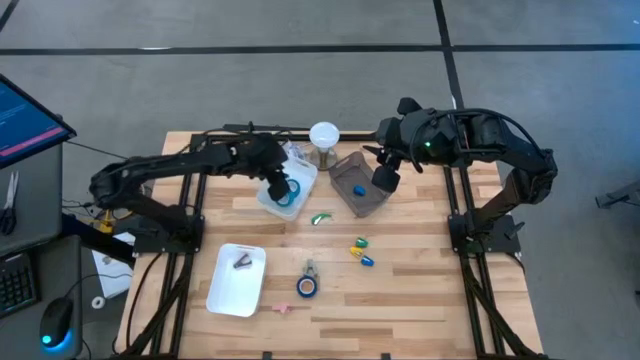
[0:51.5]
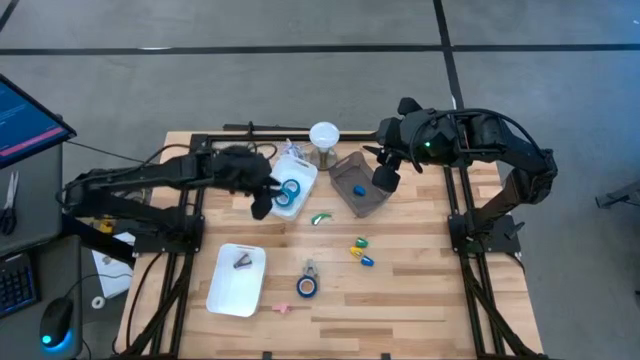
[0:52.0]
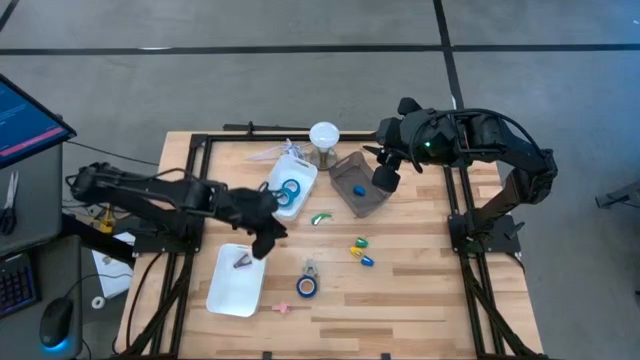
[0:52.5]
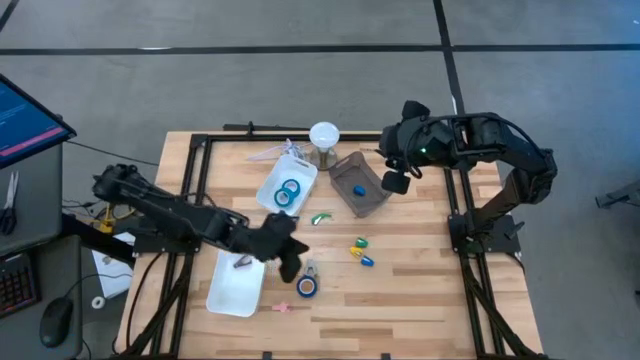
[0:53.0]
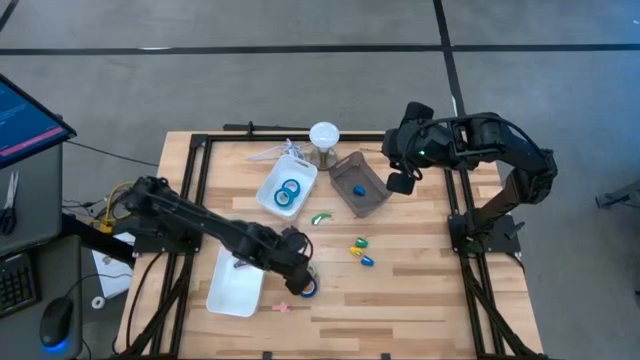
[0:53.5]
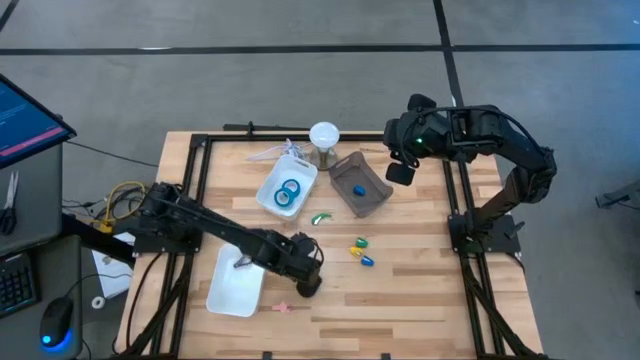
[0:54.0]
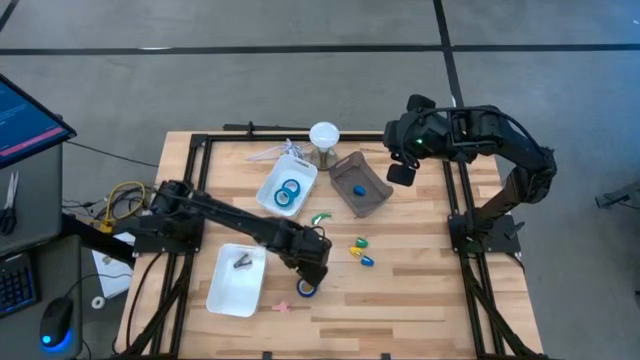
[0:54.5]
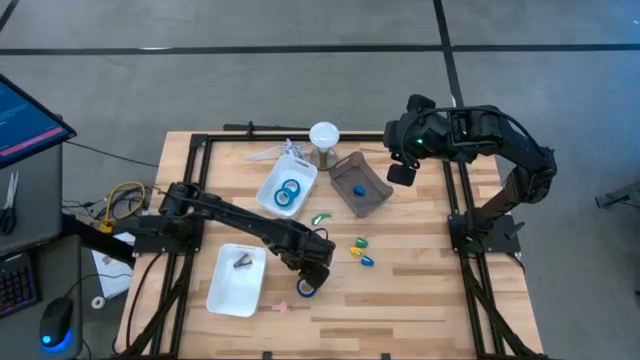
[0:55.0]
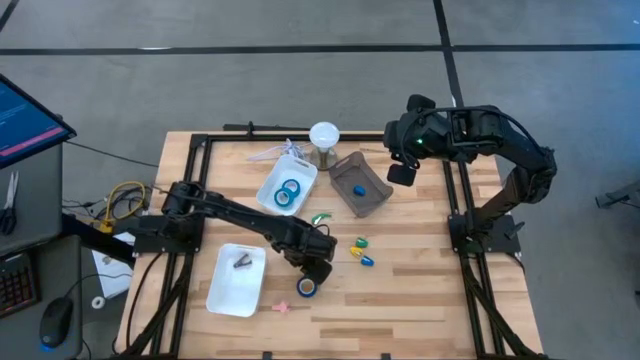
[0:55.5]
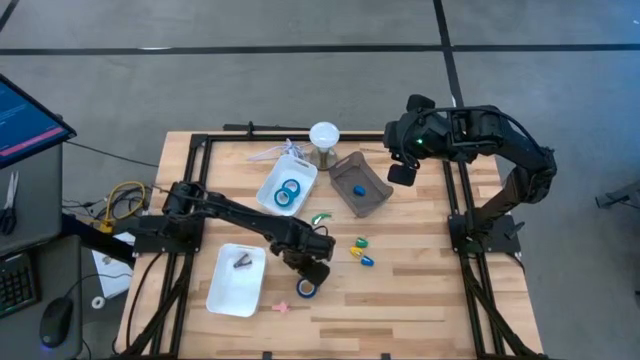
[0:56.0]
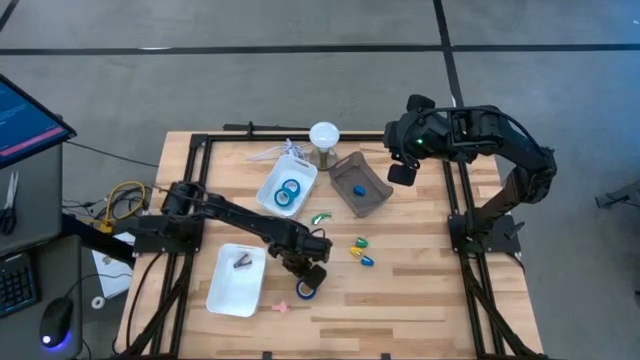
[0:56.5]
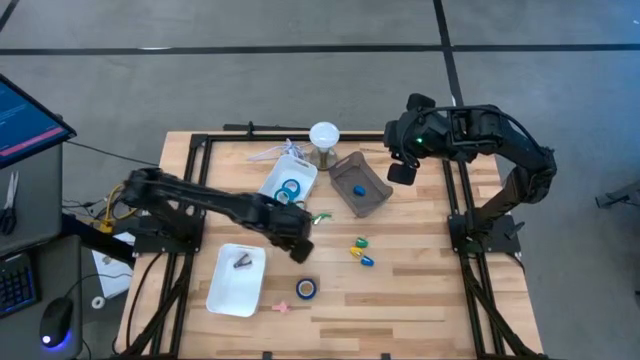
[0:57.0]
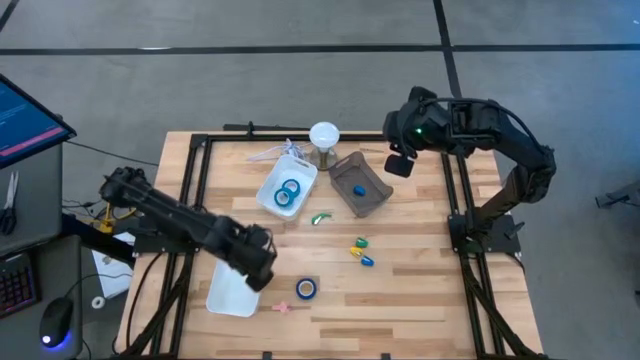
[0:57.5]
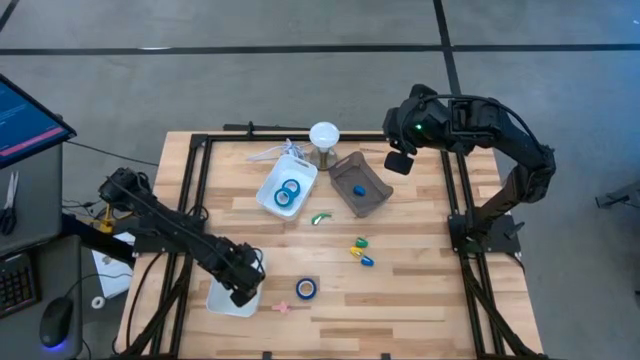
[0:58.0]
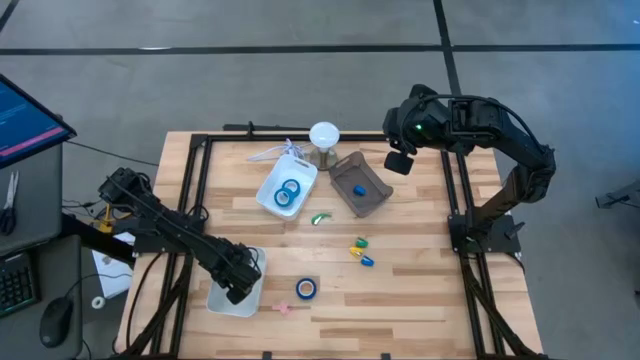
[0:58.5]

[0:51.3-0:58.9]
Task: Pick and place Stapler, Stapler remover, tape
Put the gray staple remover into the bottom white bin

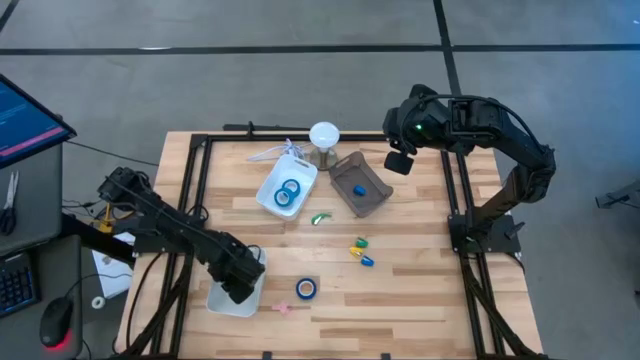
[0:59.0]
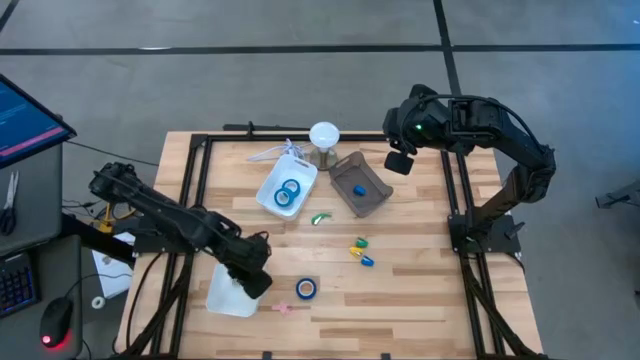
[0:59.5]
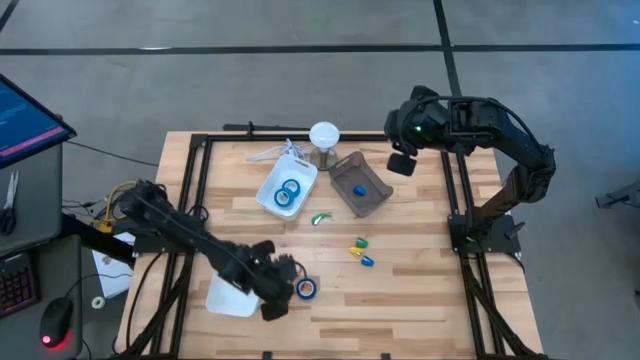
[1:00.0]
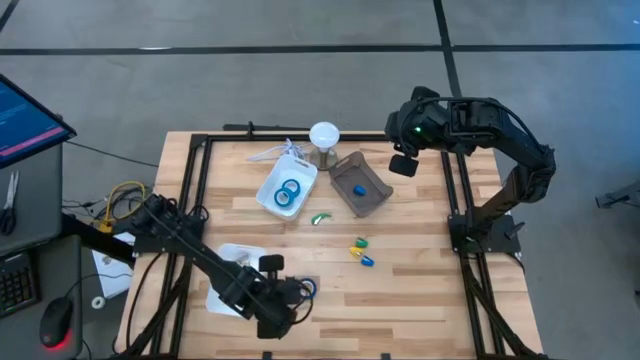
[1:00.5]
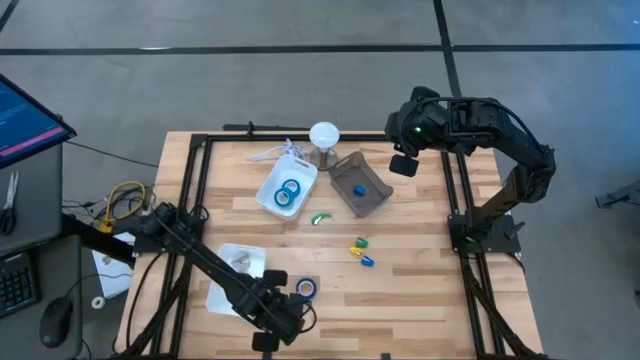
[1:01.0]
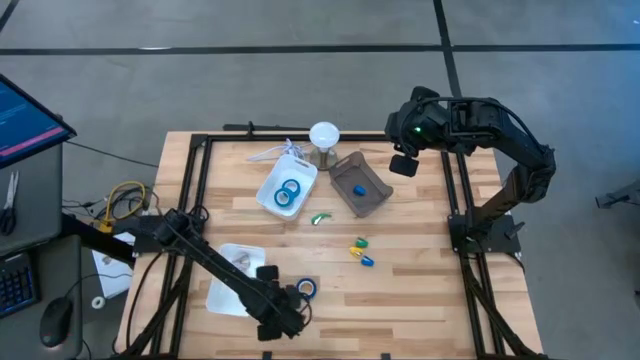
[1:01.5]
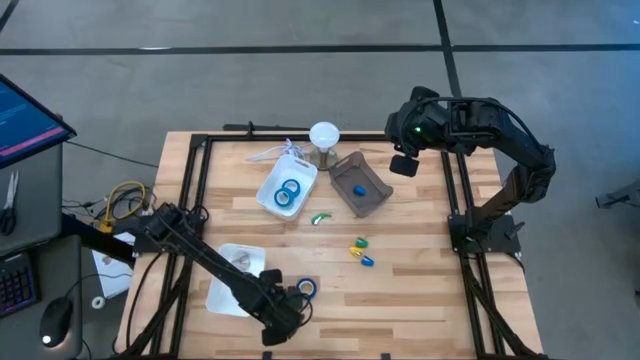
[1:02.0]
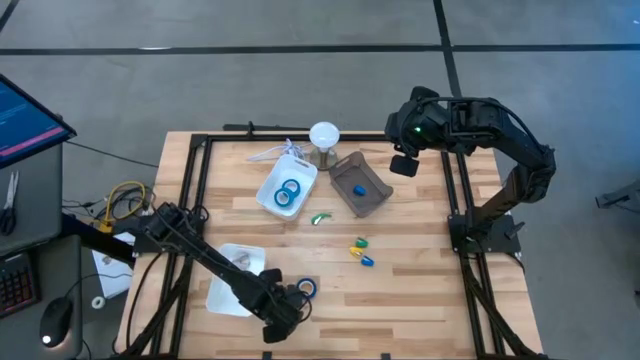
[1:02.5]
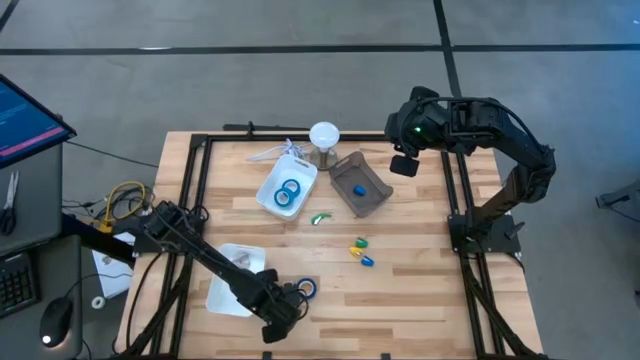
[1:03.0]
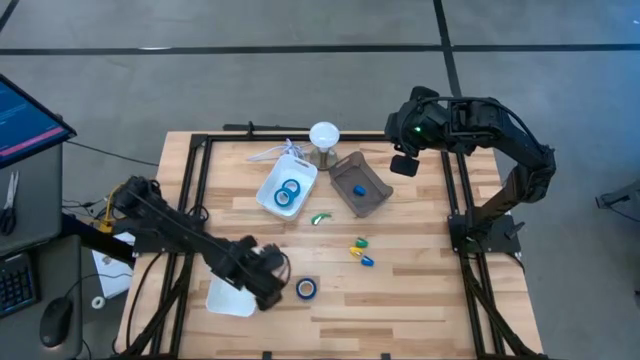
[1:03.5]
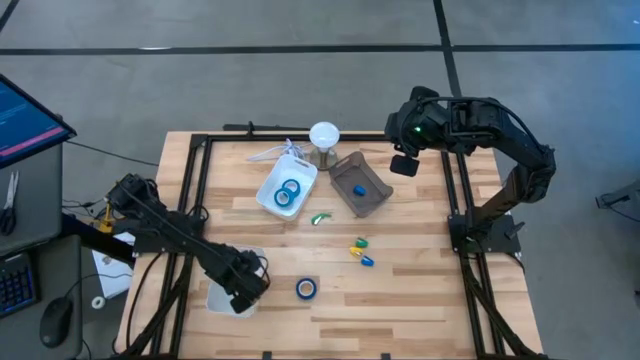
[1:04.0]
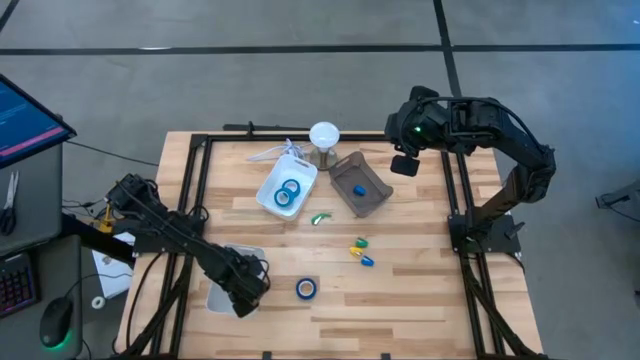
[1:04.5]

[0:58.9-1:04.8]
Put the pink staple remover into the bottom white bin

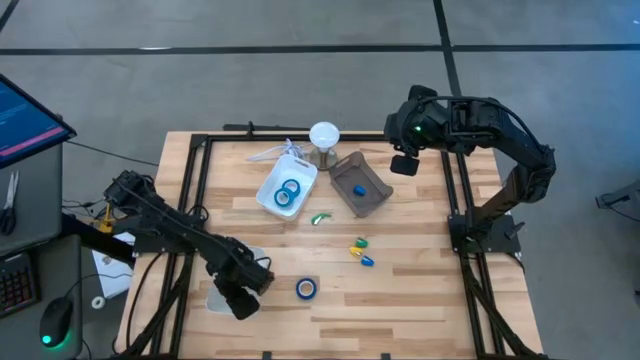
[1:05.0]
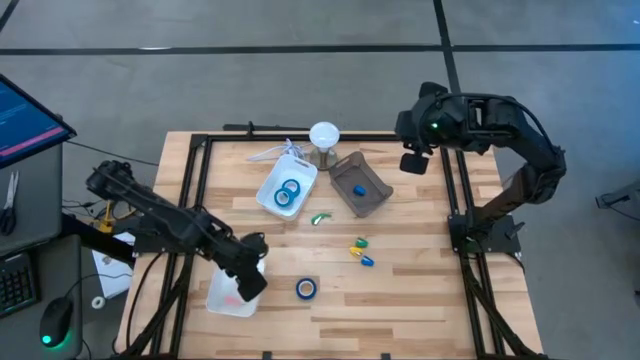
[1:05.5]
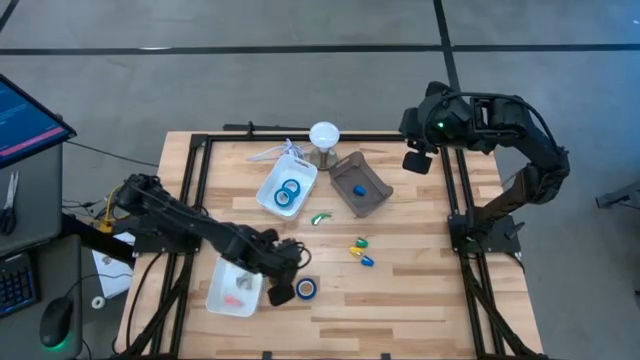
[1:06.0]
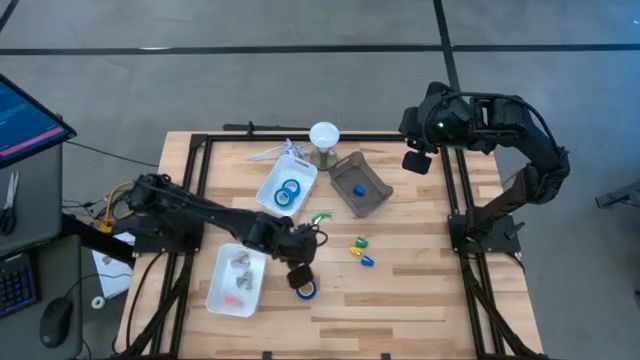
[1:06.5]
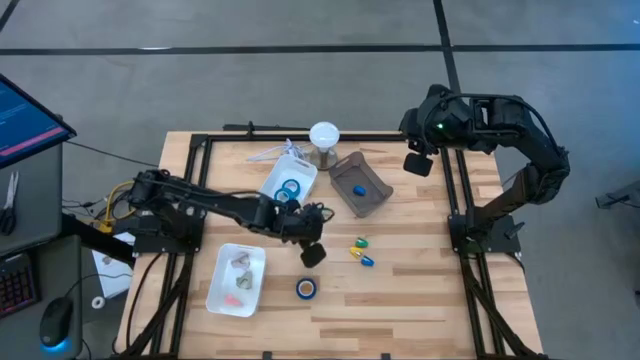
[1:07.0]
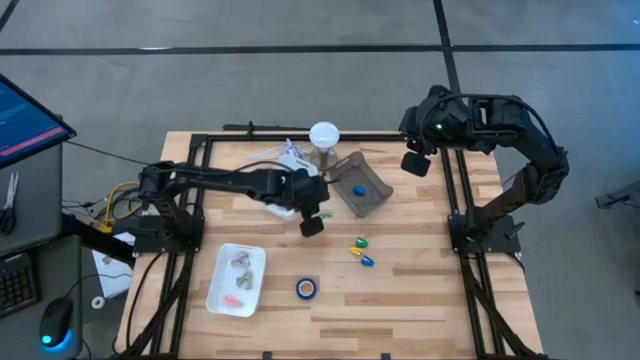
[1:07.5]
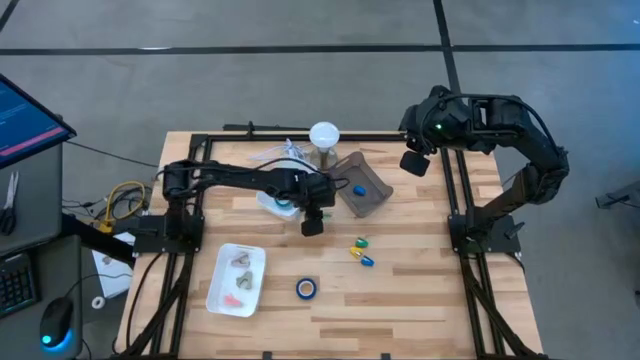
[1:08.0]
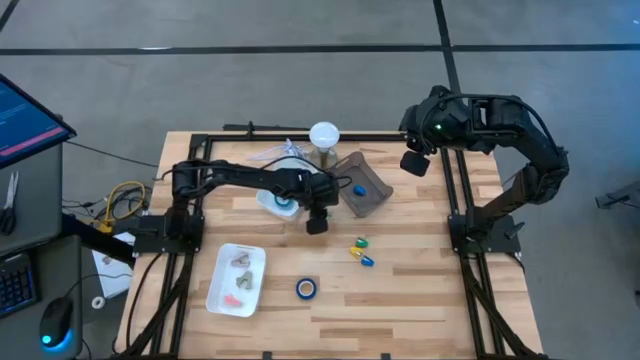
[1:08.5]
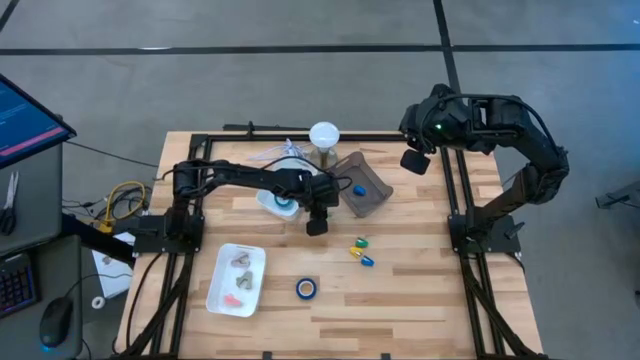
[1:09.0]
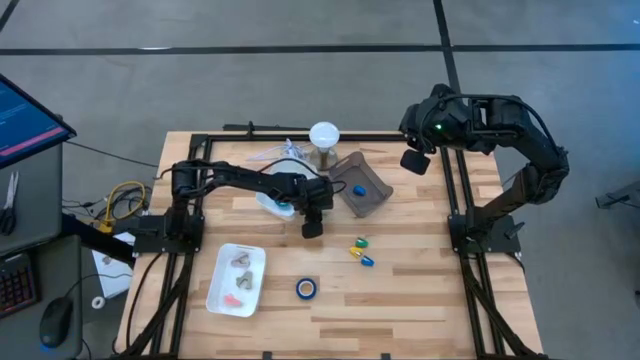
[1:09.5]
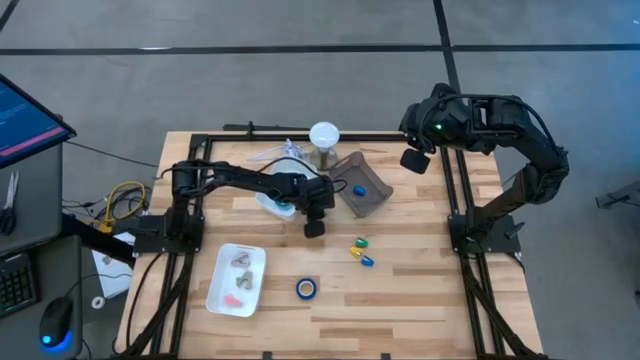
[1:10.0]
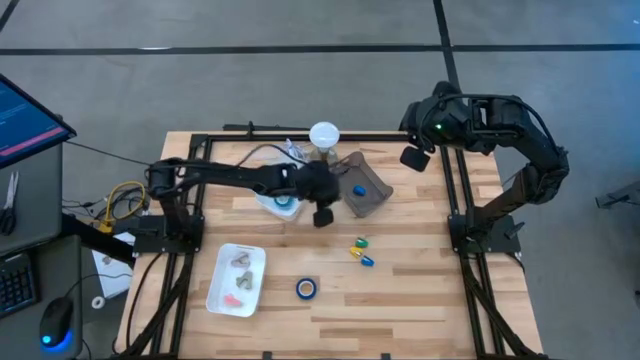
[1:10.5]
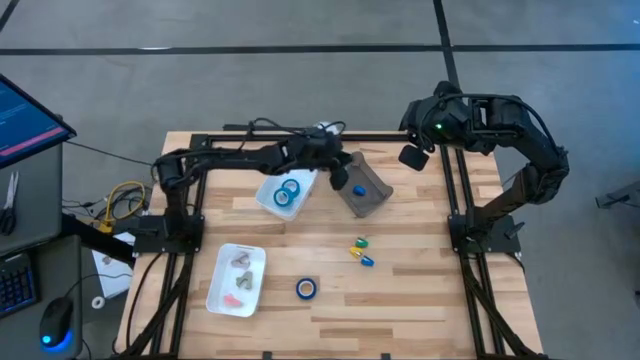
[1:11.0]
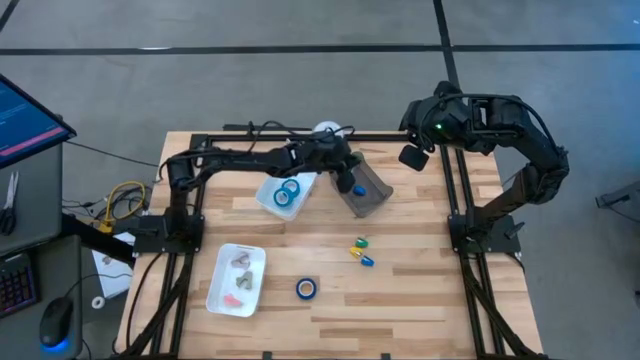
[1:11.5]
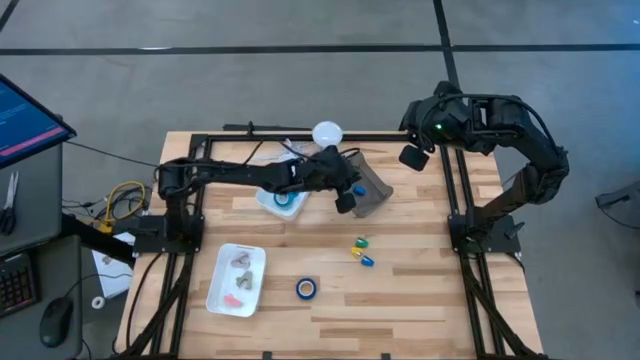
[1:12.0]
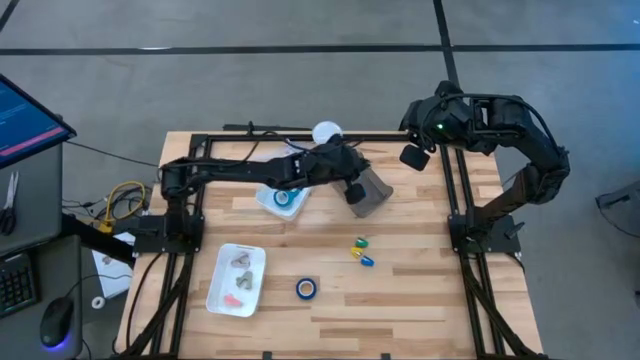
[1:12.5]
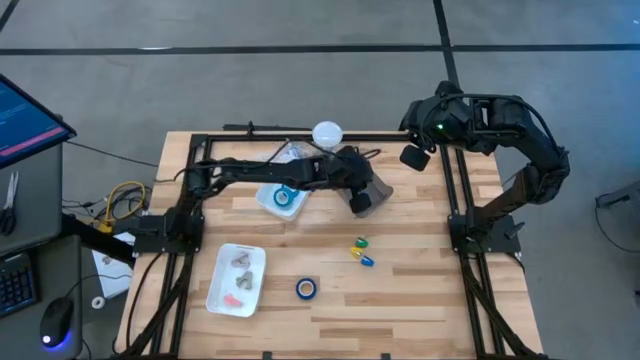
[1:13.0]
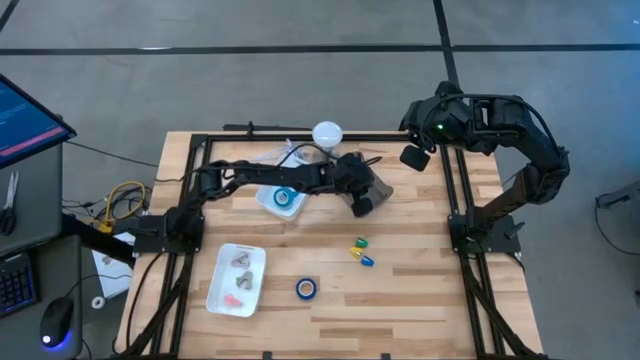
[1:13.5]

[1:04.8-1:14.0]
Put the top green stapler into the black bin
